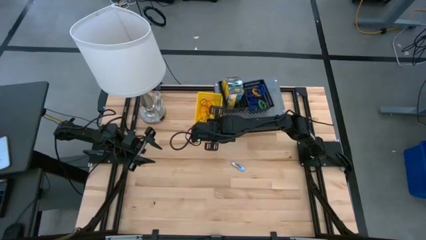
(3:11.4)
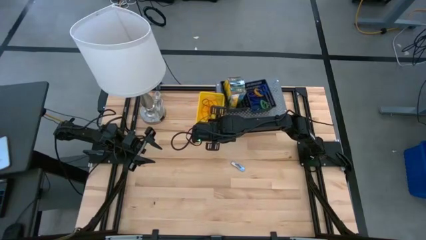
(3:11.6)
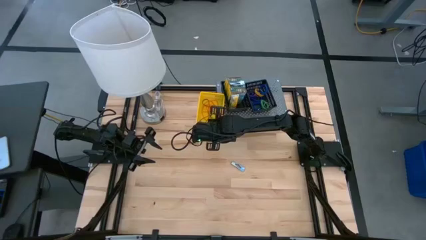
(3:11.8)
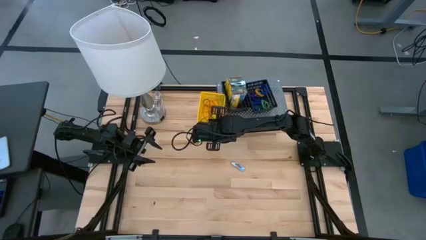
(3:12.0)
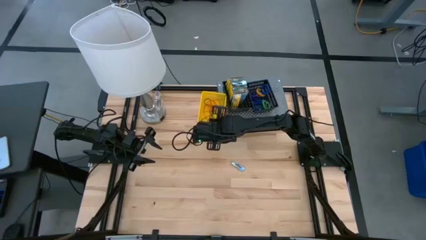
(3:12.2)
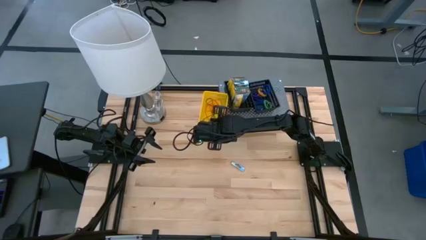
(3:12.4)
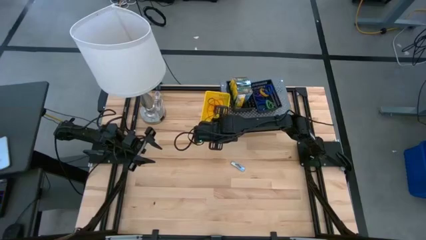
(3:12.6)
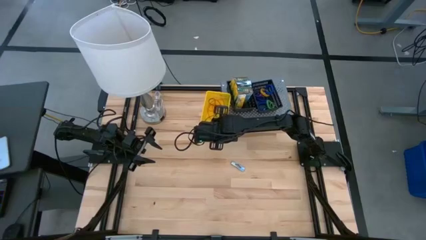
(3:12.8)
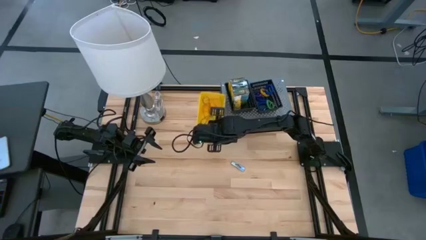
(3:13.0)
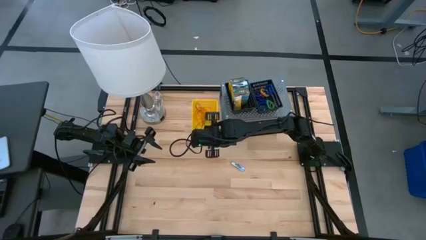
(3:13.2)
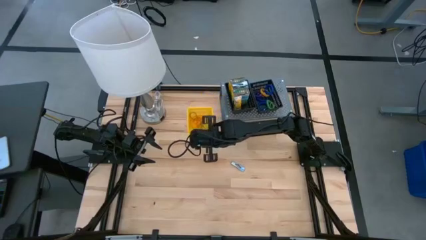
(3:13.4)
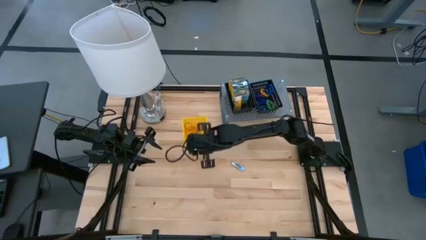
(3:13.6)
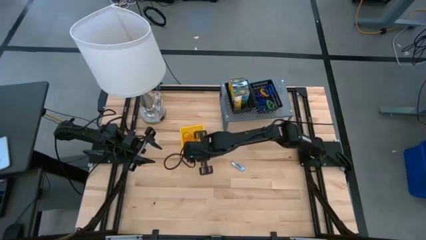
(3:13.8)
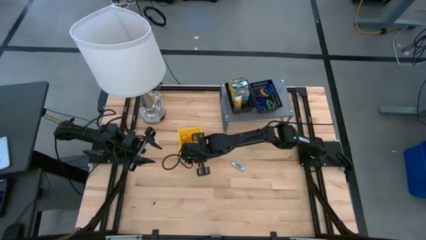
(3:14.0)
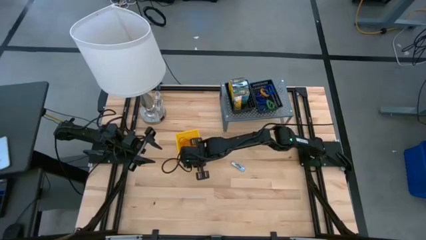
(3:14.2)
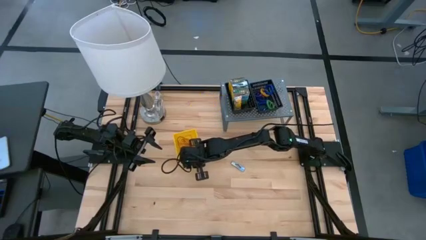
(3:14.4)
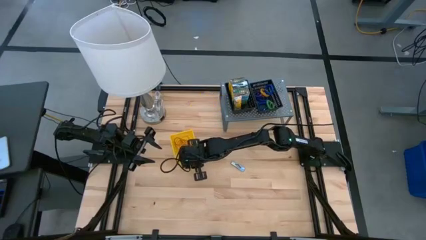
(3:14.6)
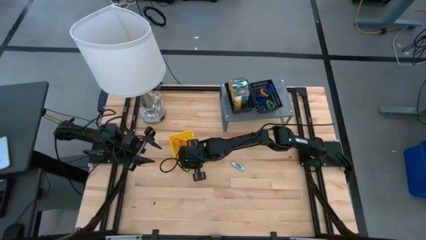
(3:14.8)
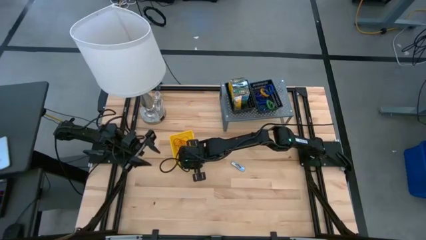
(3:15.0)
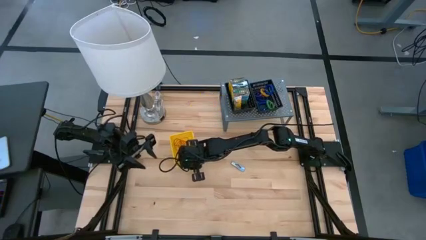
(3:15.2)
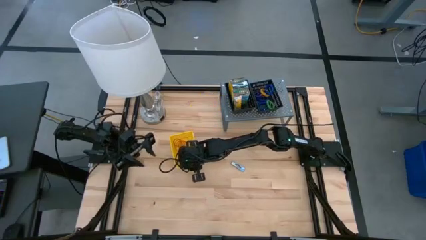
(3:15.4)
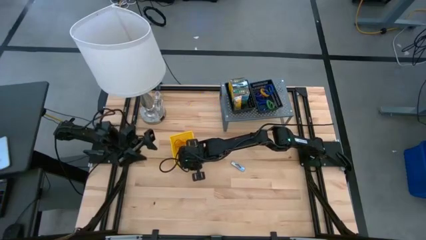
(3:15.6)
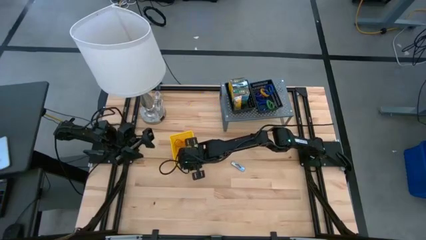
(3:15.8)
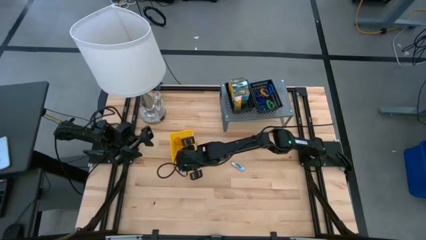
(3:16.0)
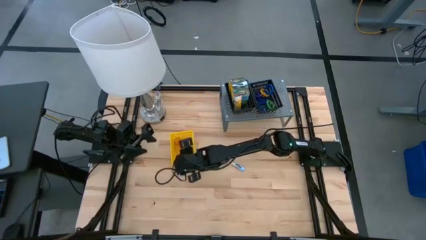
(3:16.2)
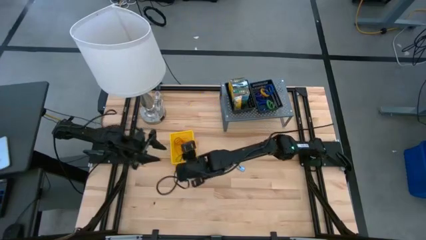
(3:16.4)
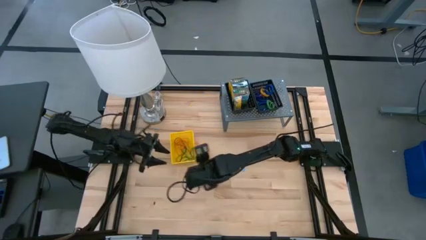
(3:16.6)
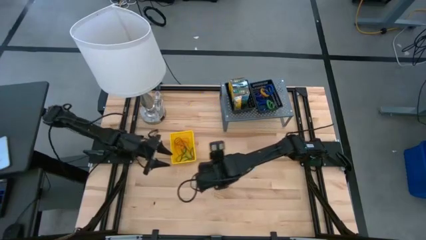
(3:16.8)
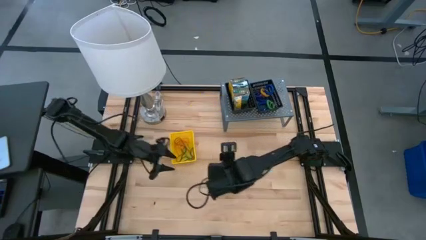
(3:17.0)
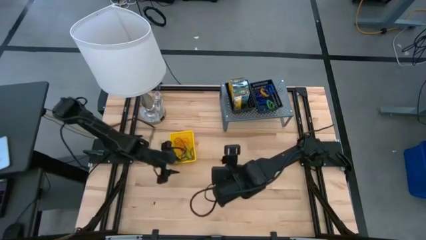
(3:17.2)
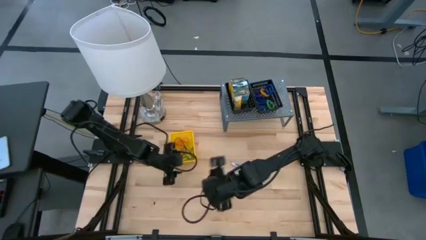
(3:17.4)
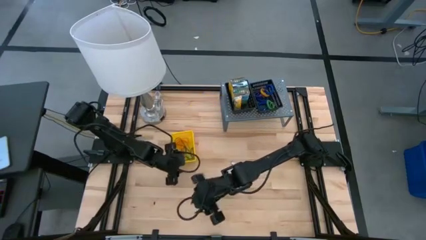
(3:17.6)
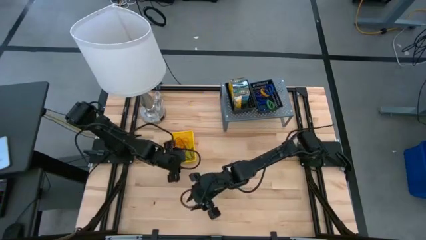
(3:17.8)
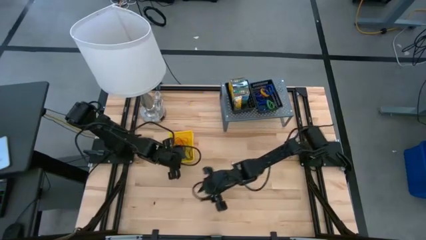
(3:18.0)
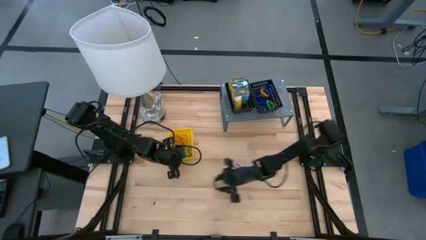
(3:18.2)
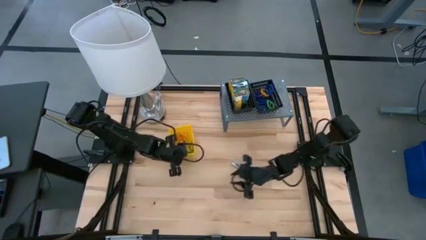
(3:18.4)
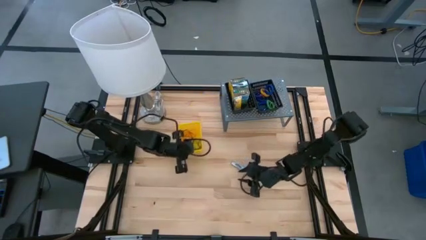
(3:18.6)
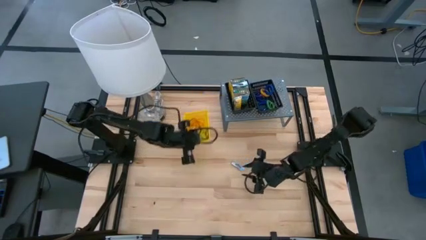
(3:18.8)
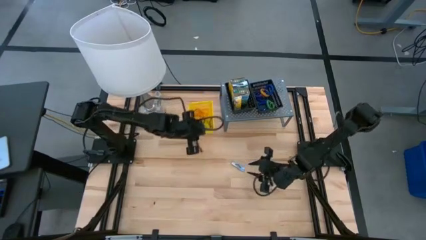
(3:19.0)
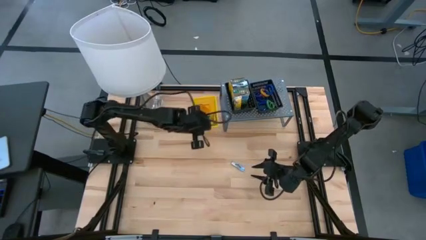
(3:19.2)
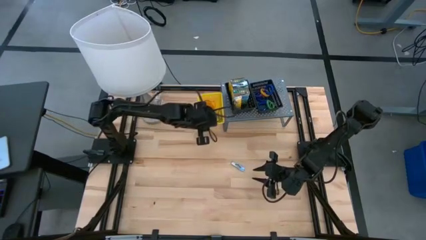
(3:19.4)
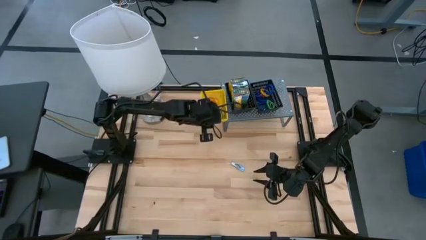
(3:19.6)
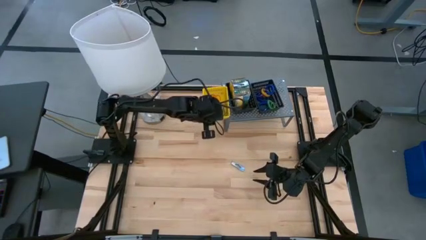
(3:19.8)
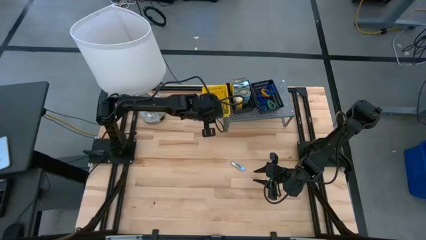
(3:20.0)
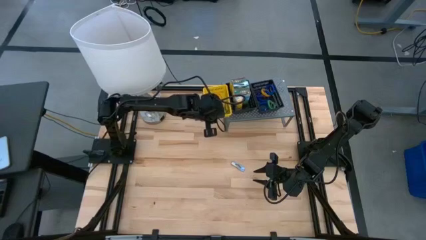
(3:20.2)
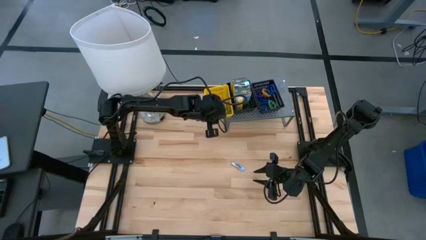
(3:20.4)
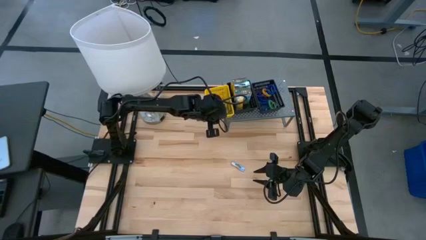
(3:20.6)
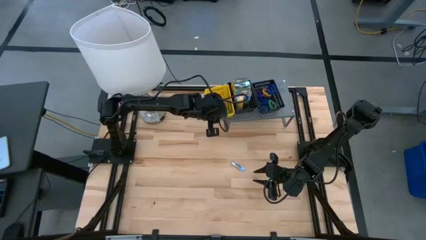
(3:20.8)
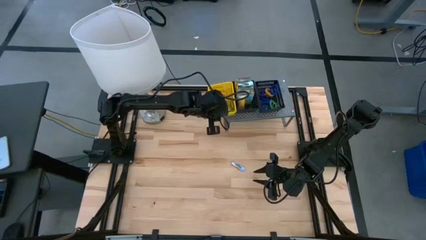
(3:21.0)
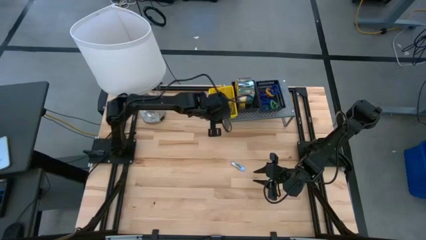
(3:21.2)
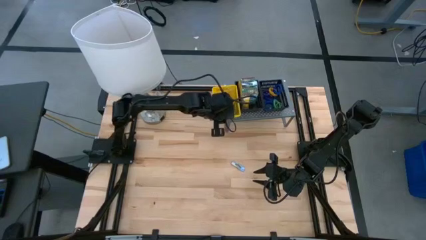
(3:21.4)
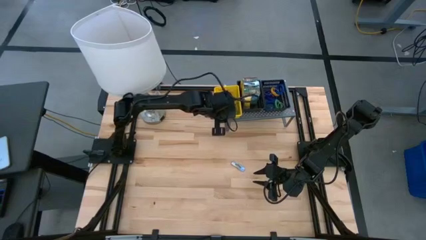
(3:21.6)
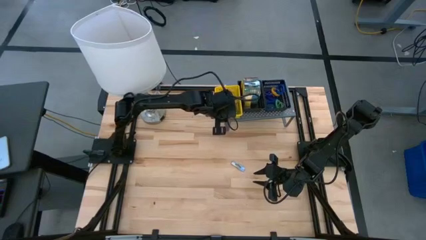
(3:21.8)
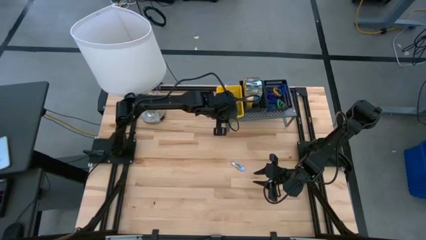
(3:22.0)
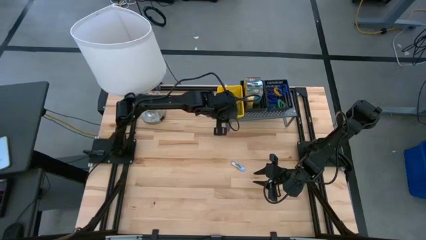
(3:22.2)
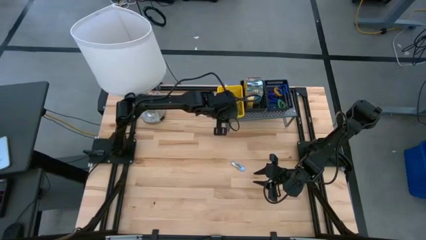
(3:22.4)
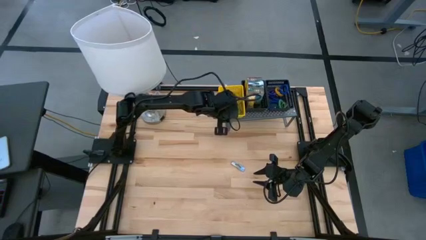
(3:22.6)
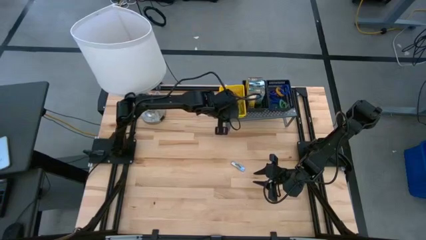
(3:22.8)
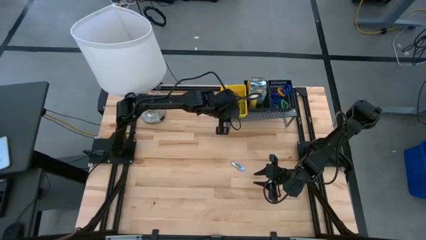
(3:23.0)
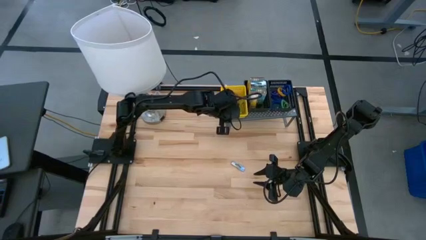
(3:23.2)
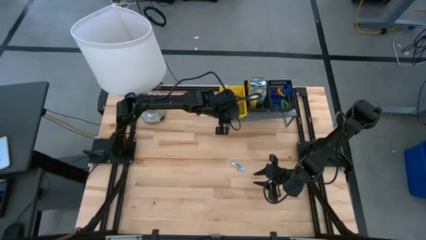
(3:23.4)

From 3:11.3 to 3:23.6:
Task: Pick & Place Office Desk Supplies
Put the yellow bin on the shelf

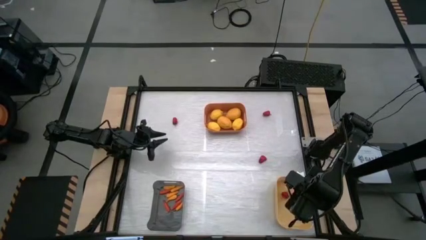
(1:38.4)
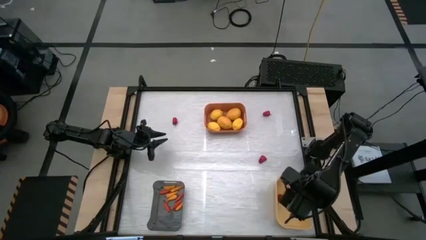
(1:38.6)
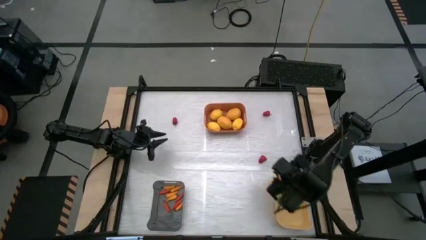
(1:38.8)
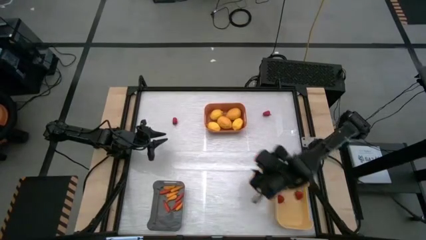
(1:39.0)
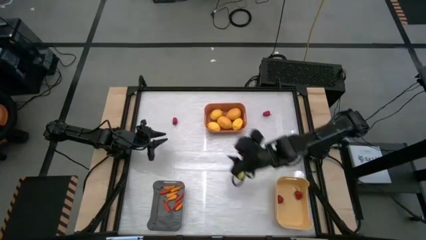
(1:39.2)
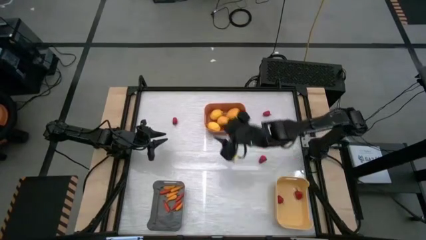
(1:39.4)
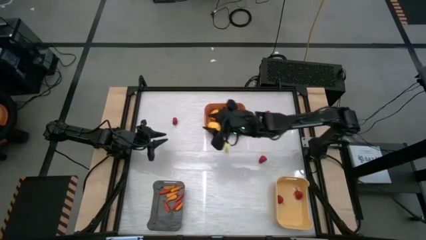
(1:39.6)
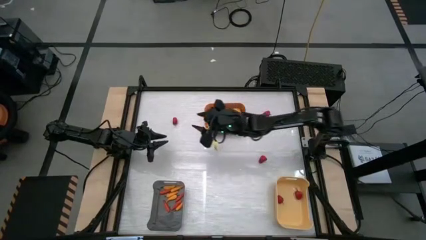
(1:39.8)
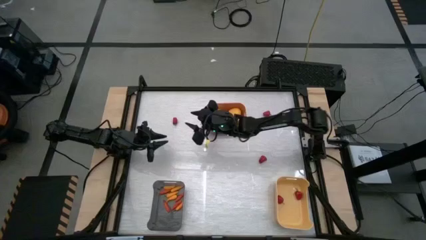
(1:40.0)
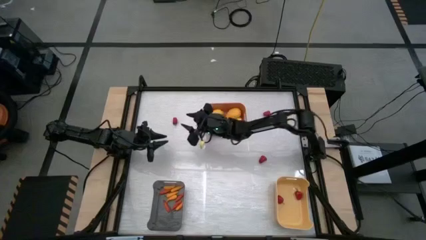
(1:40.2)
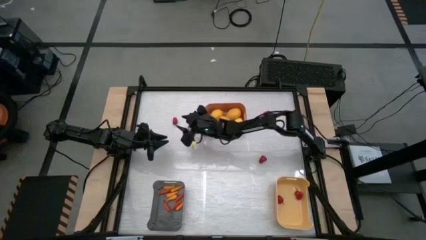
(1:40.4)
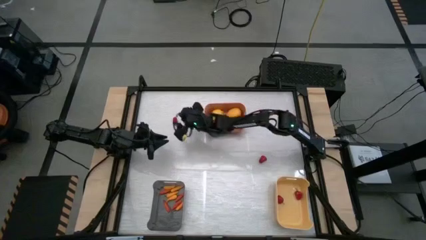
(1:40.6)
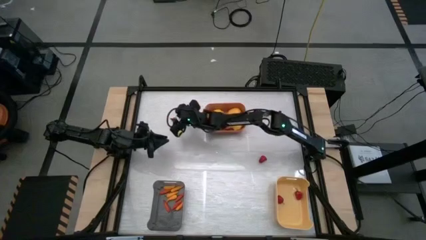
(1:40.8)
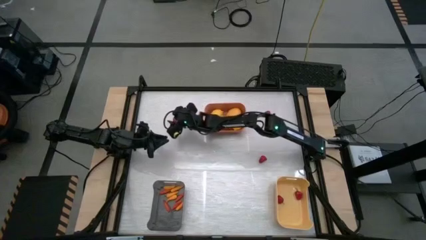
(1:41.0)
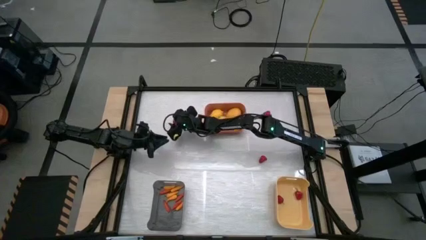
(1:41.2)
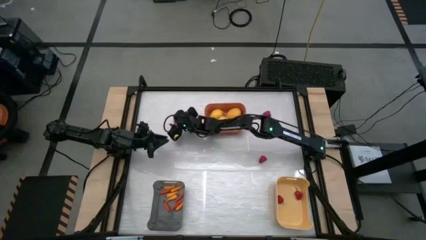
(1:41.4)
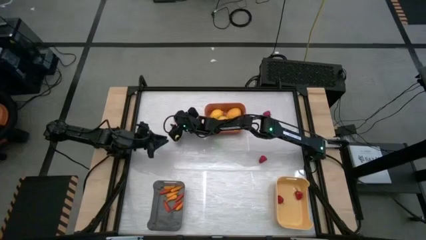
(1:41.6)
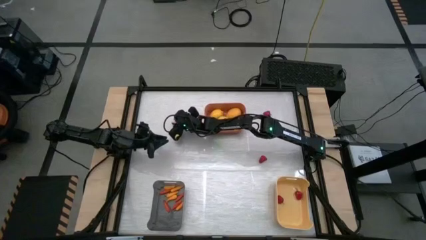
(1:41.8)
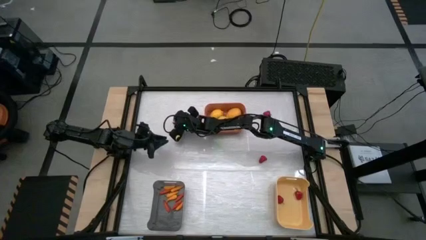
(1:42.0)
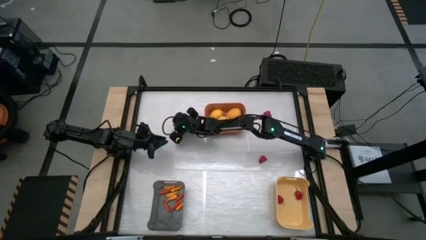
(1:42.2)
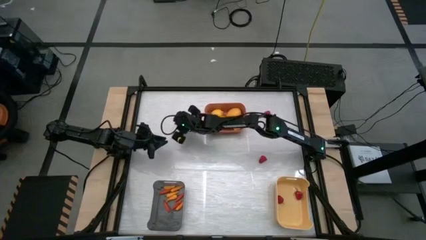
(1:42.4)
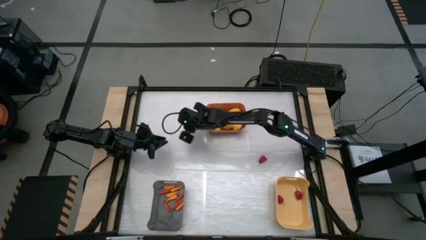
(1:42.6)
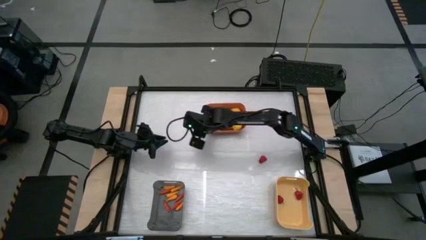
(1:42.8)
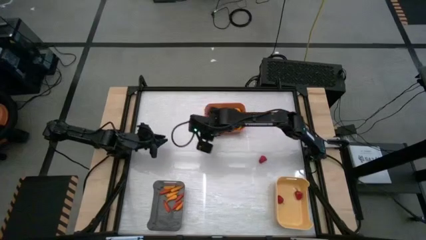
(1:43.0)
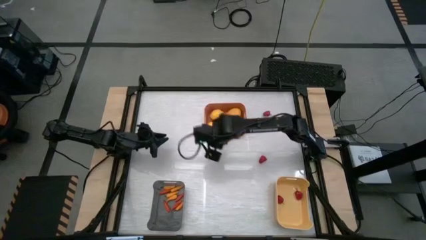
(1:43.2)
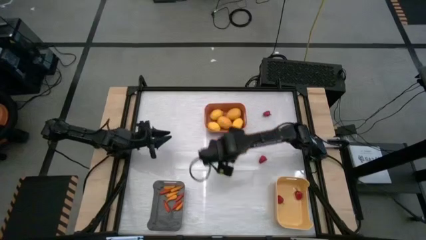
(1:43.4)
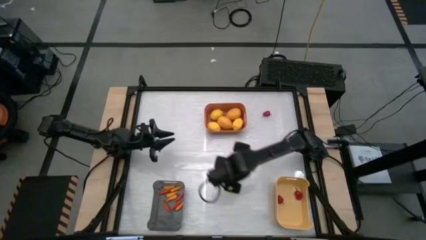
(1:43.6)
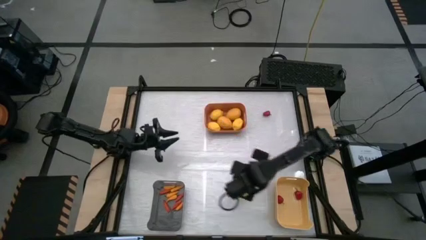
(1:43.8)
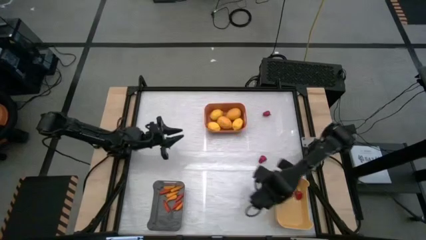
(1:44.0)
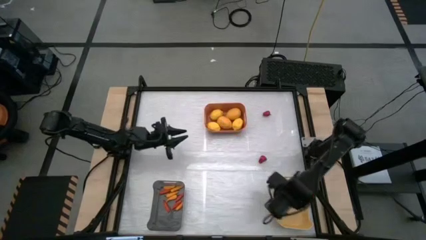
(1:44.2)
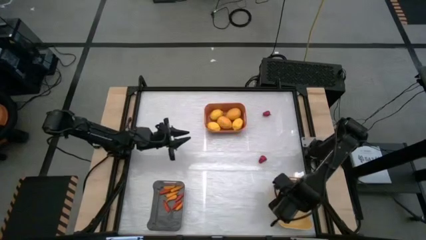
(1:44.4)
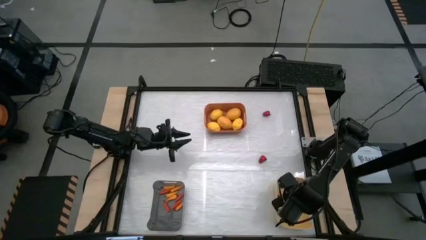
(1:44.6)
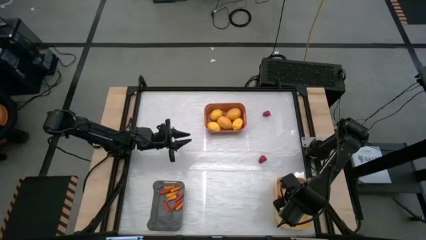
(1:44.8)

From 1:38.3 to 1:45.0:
Task: Sort produce into baskets
Put the red chili pepper into the yellow bin
